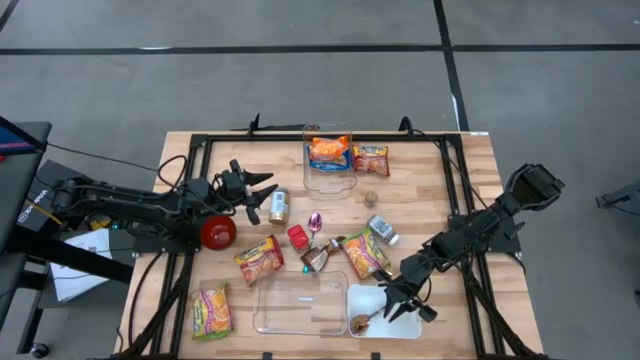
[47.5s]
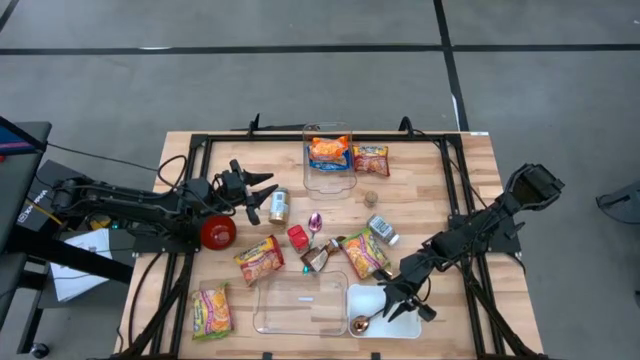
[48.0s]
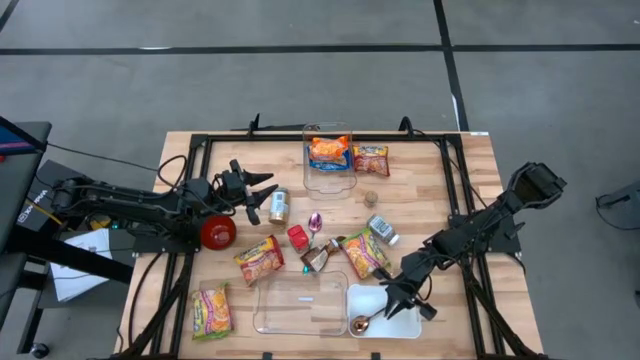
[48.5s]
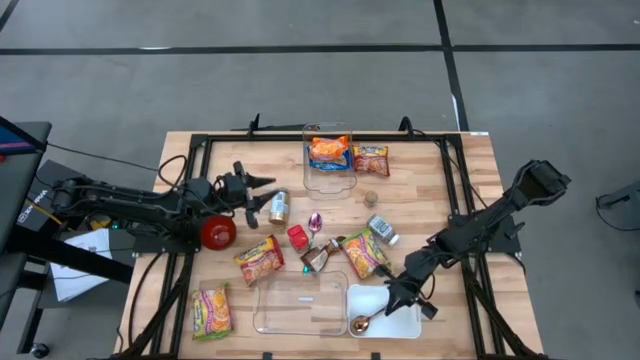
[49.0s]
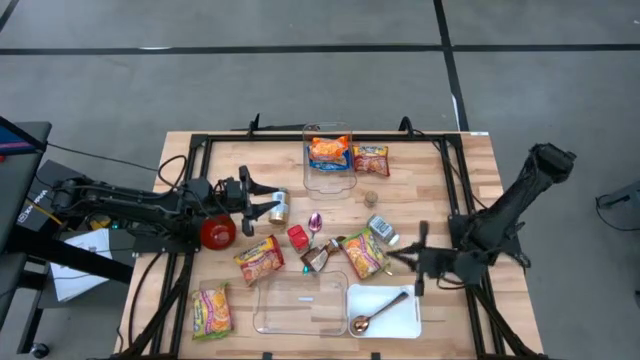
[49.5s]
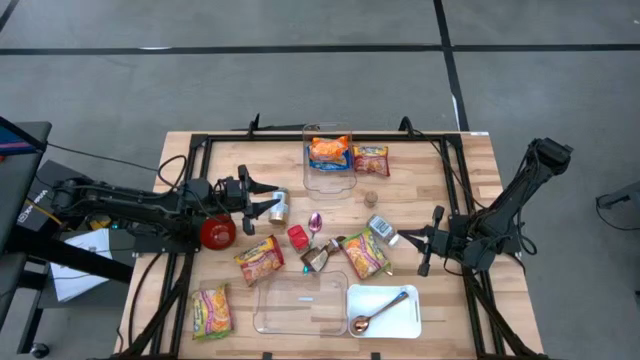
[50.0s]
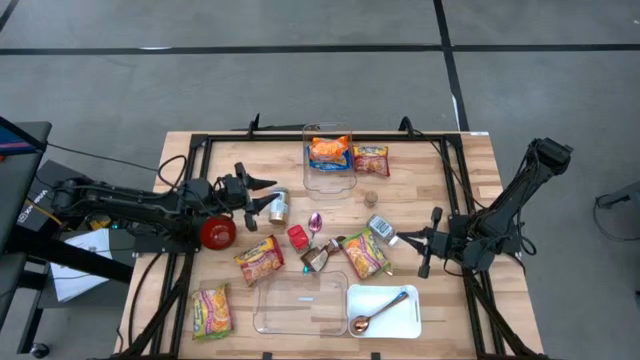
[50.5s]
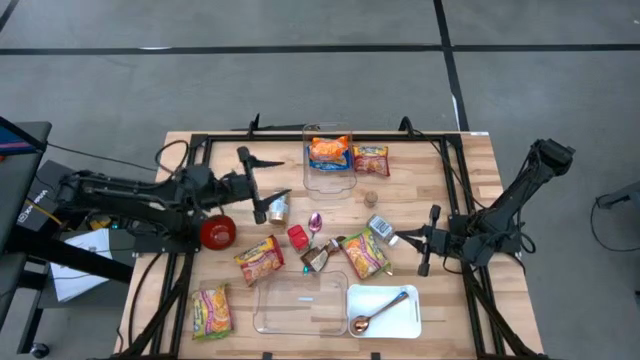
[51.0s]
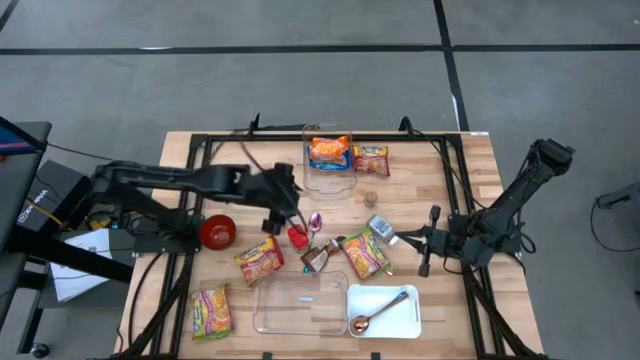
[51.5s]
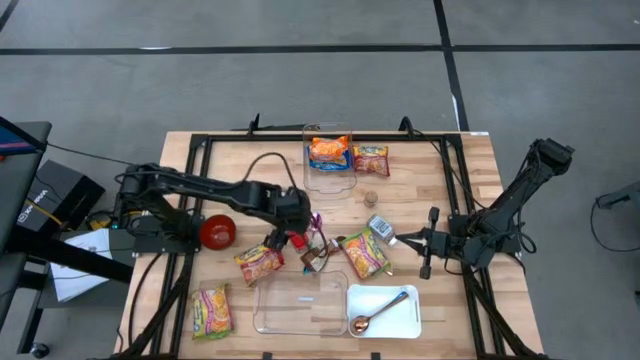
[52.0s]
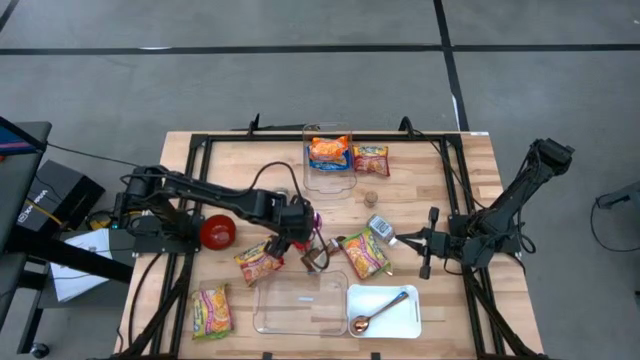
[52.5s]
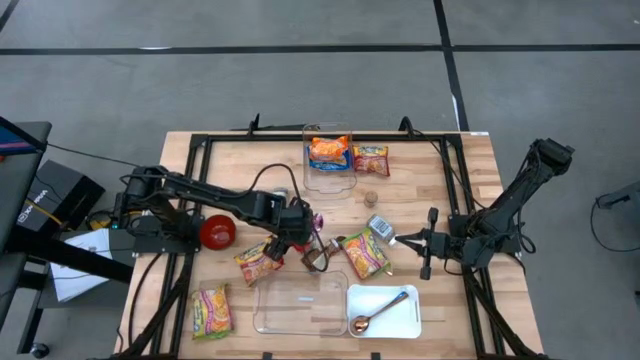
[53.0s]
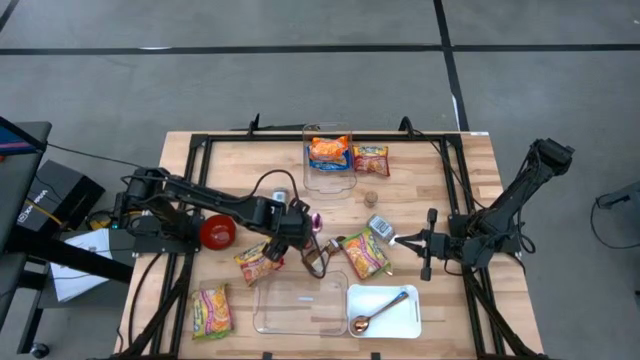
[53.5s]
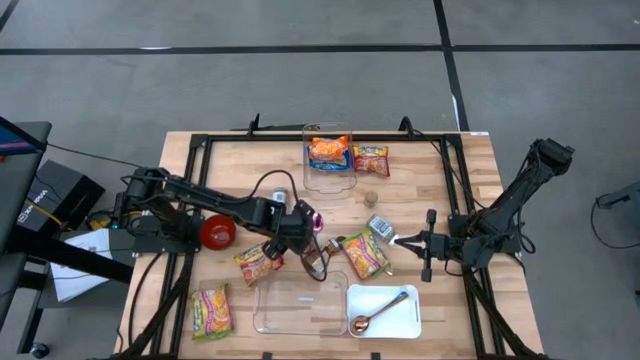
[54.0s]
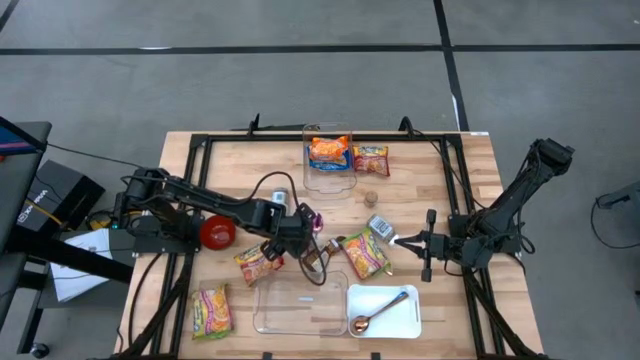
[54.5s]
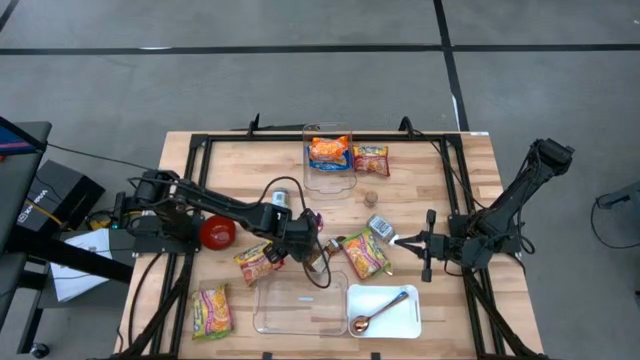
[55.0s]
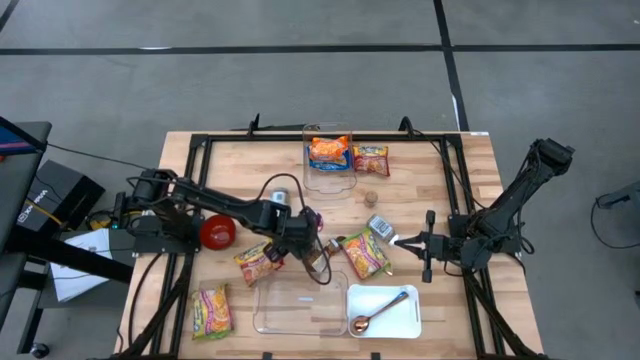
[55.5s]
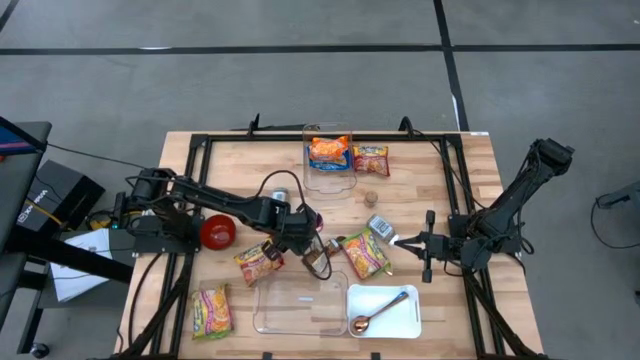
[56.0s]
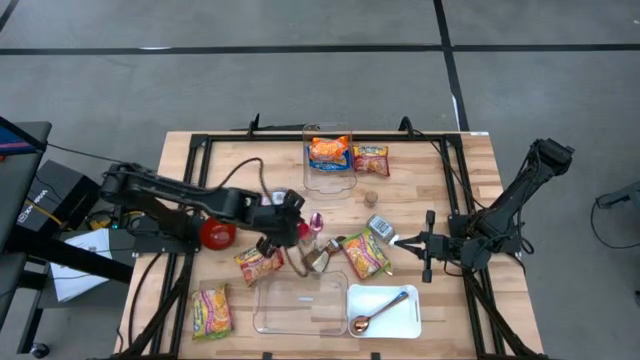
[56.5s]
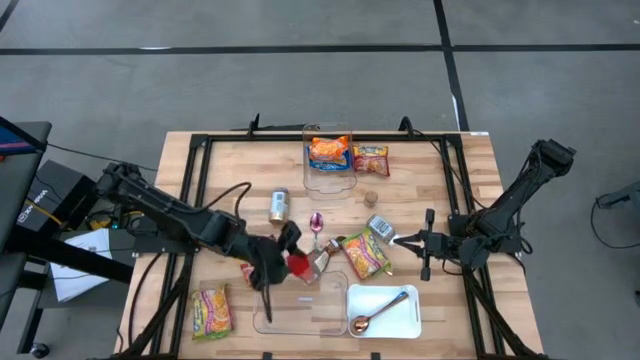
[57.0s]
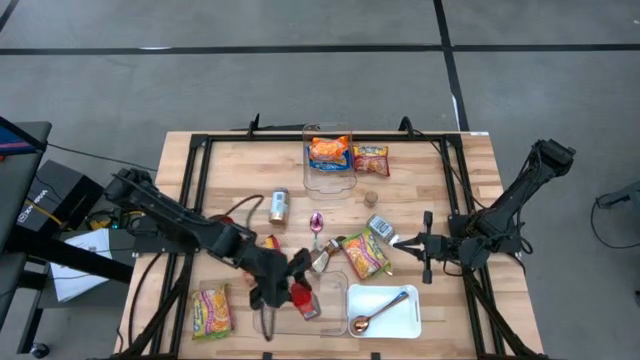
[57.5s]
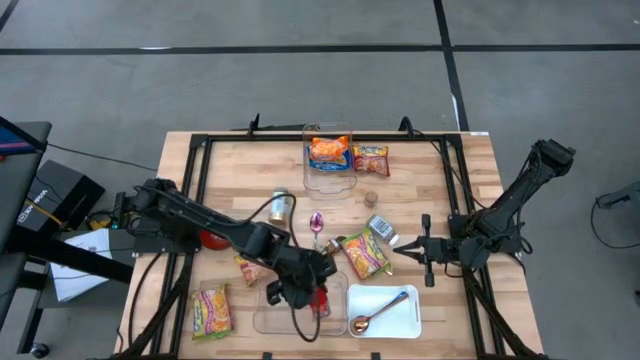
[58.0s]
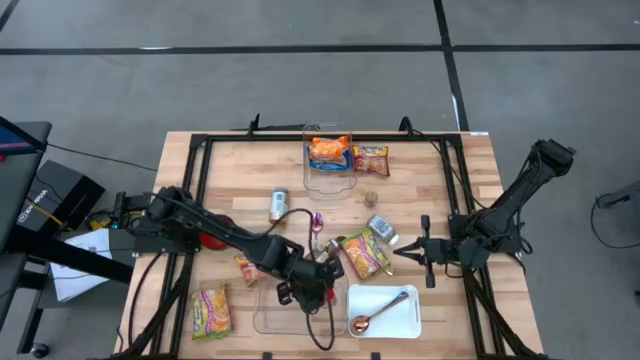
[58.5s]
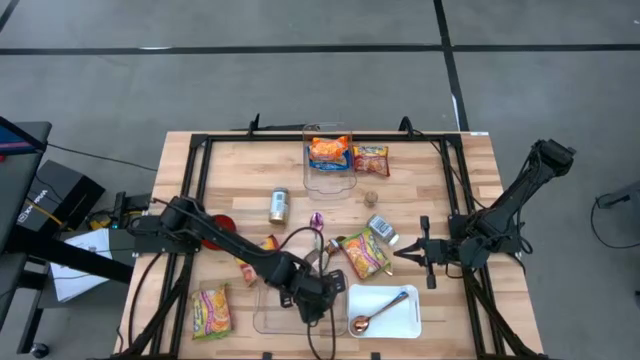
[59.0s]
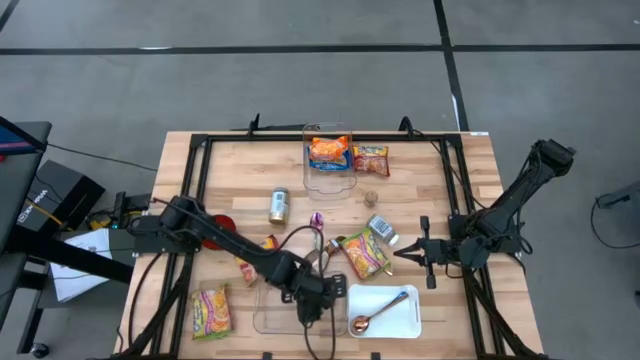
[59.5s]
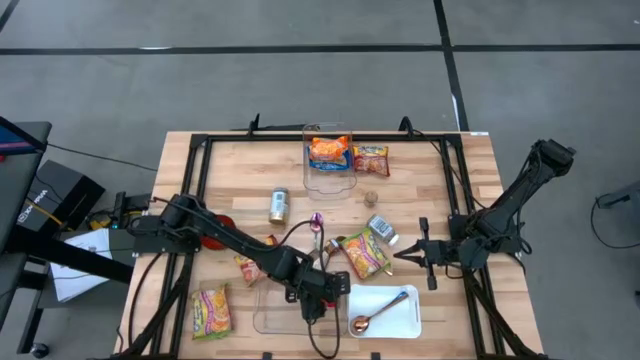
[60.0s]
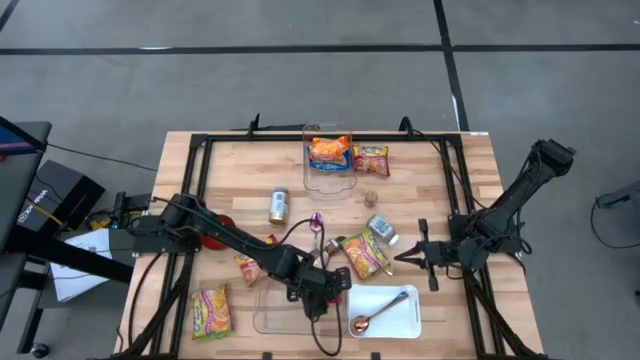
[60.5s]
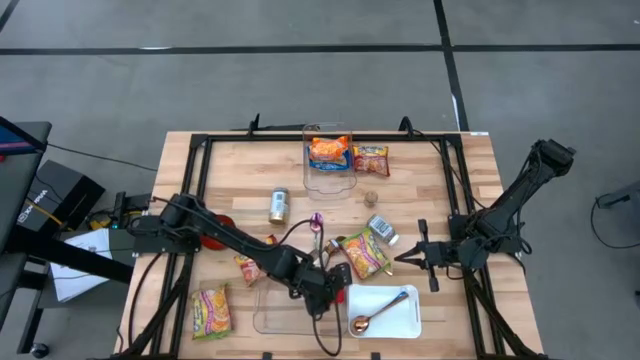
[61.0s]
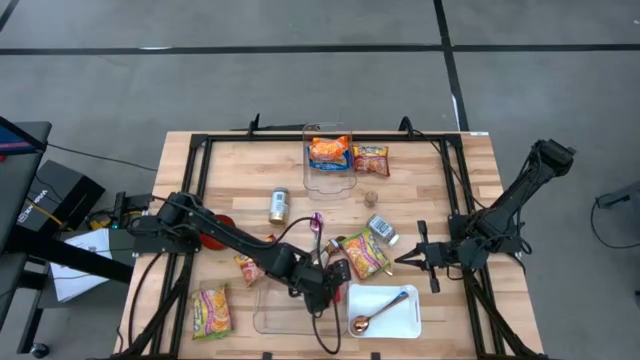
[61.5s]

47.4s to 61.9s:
Task: Pick & Place Food Item
Put the red seasoning can into the bottom transparent bin

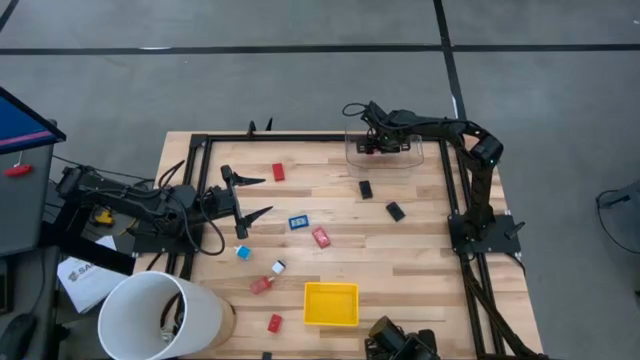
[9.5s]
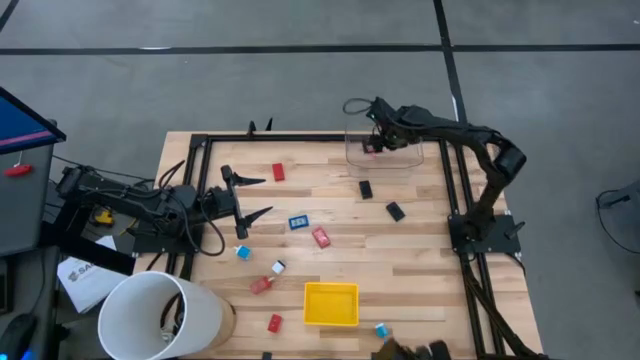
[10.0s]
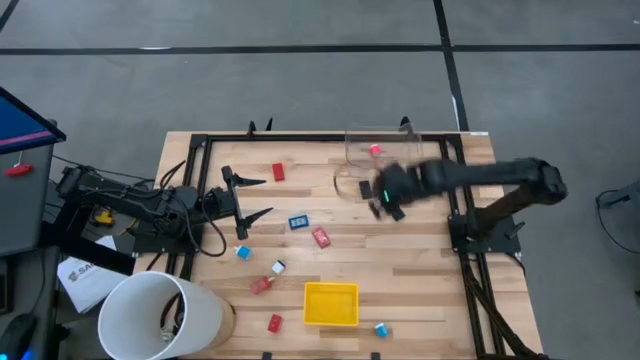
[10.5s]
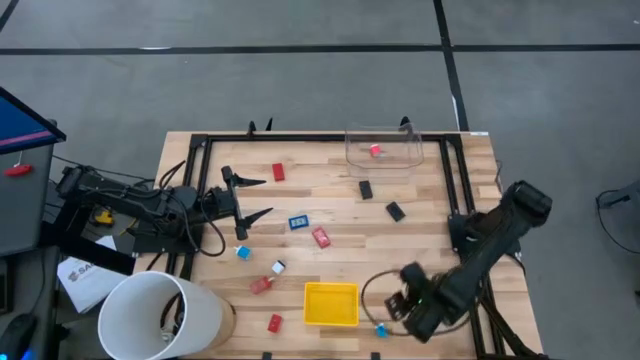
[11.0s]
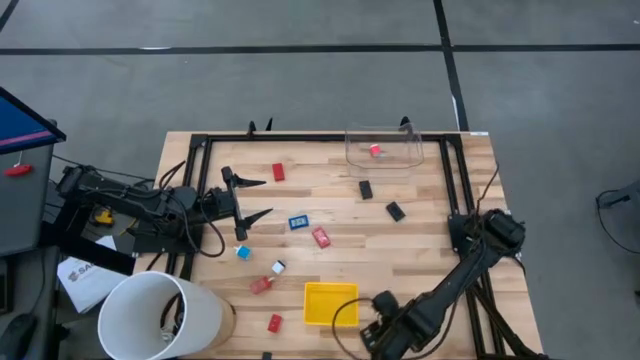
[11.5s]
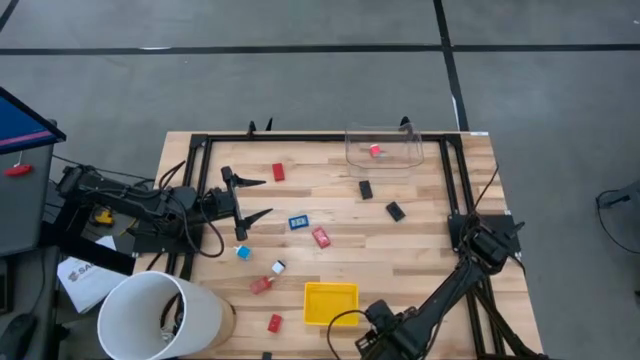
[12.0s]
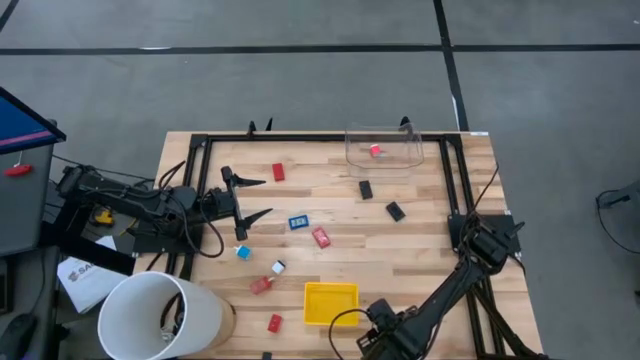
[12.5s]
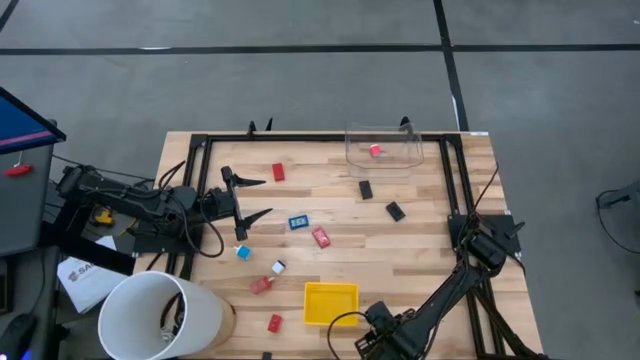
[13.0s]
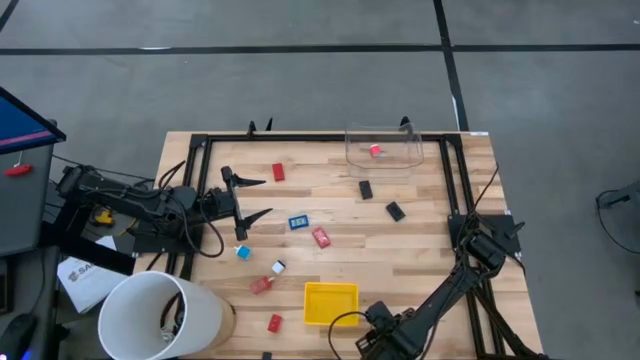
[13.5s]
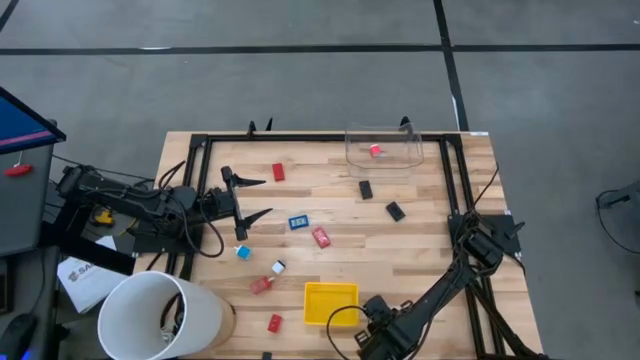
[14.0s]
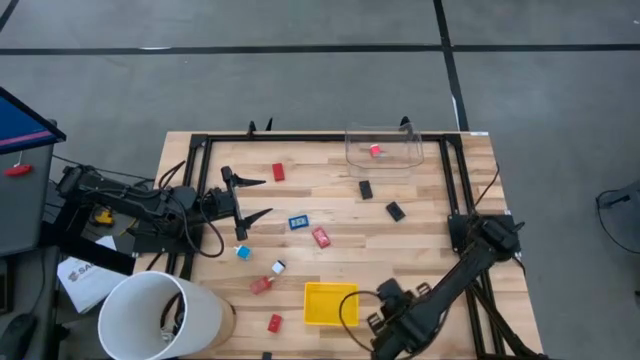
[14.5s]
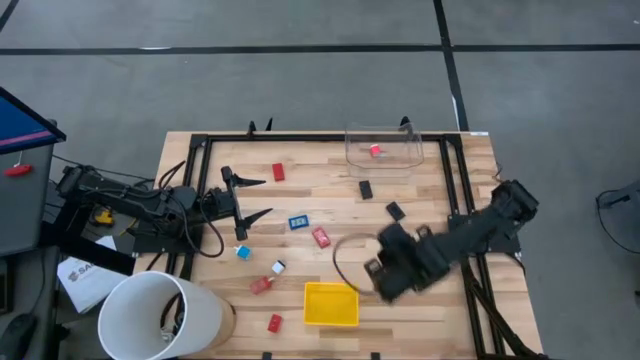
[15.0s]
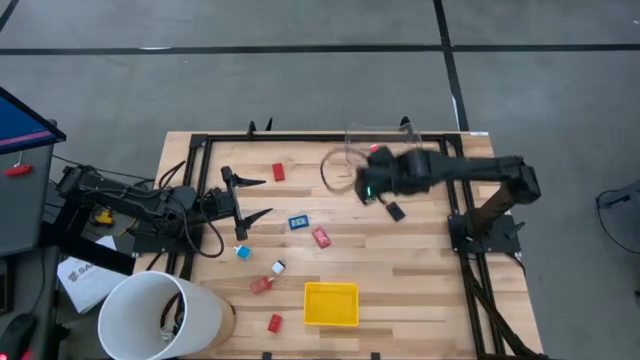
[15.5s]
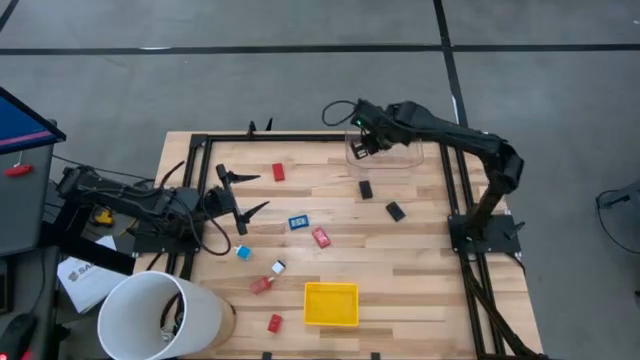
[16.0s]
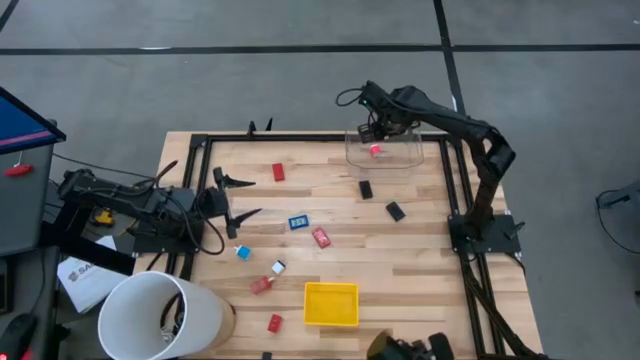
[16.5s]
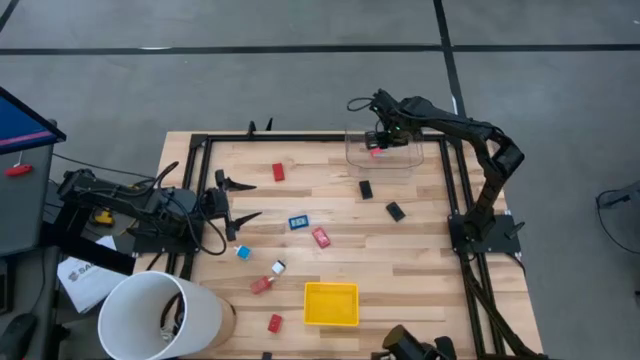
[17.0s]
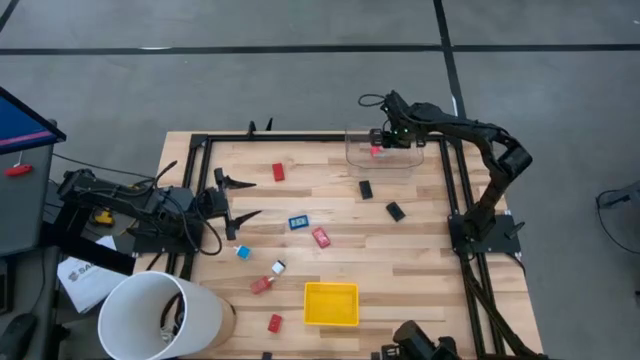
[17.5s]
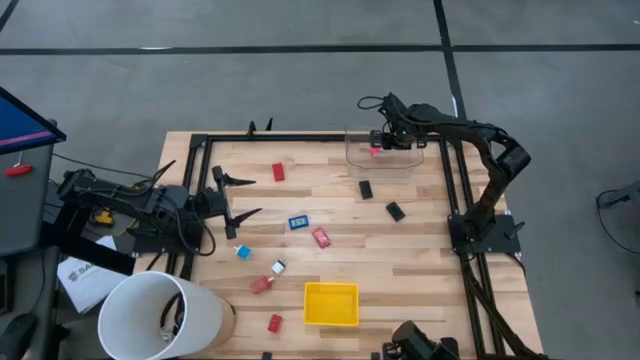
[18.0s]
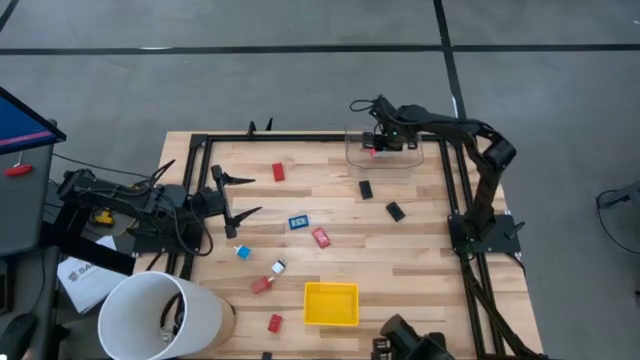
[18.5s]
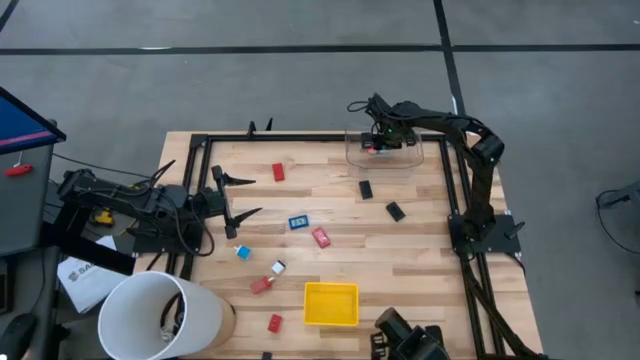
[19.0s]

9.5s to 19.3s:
Task: Pick & Place Office items
Put the bottom blue charger adapter into the transparent bin
